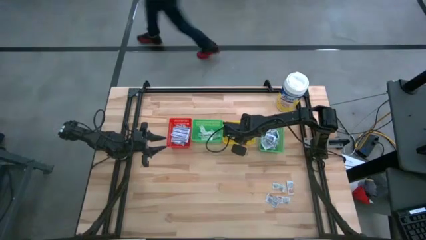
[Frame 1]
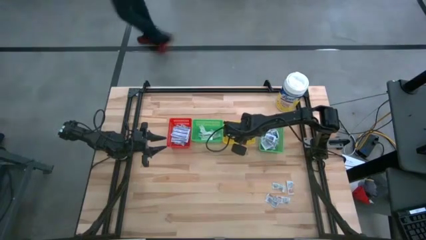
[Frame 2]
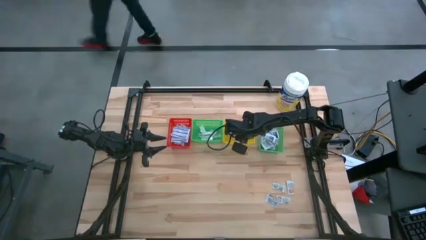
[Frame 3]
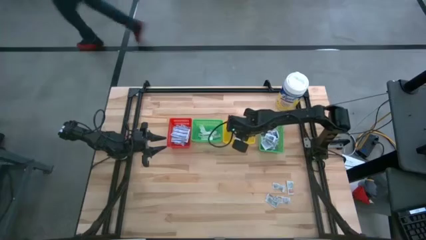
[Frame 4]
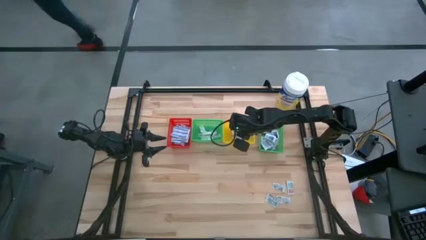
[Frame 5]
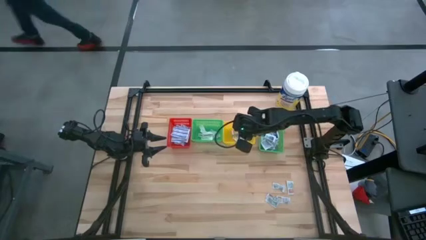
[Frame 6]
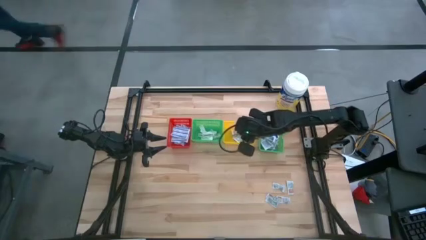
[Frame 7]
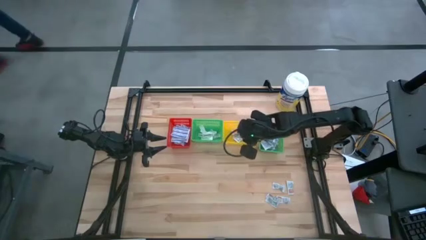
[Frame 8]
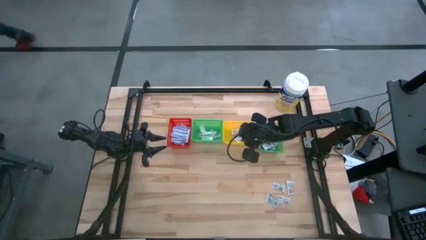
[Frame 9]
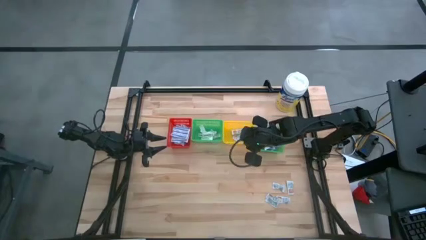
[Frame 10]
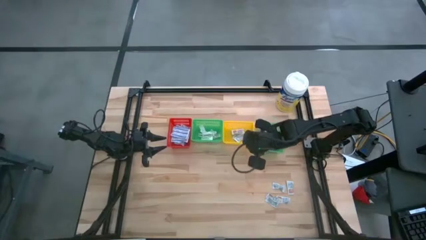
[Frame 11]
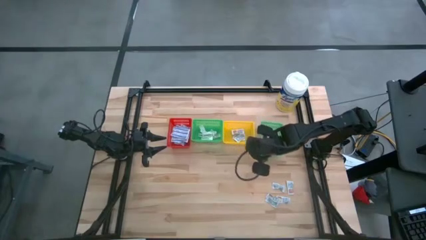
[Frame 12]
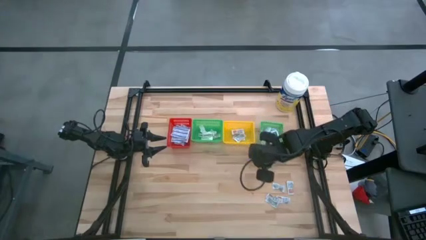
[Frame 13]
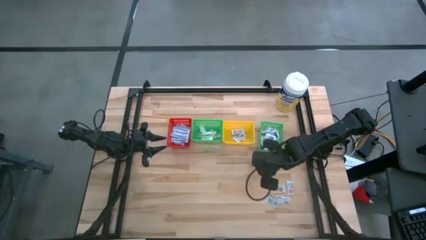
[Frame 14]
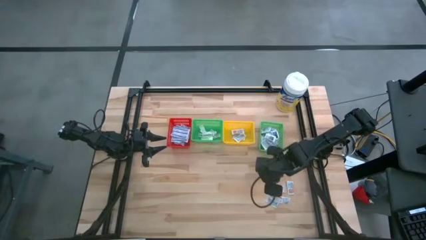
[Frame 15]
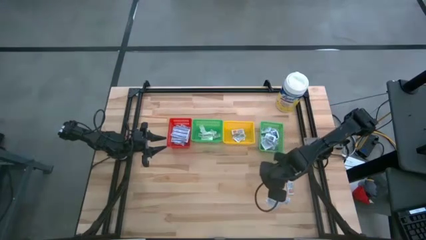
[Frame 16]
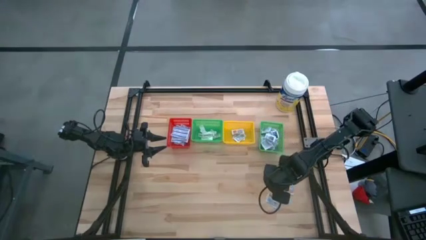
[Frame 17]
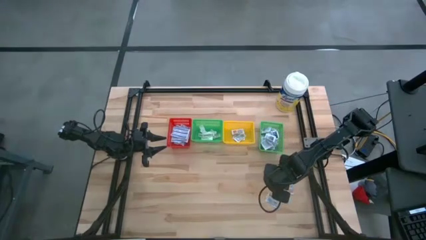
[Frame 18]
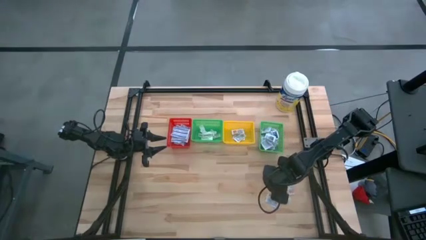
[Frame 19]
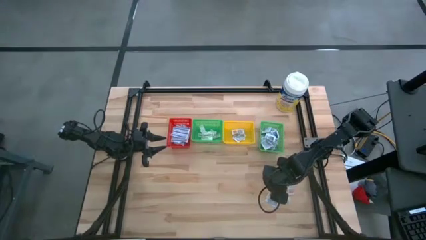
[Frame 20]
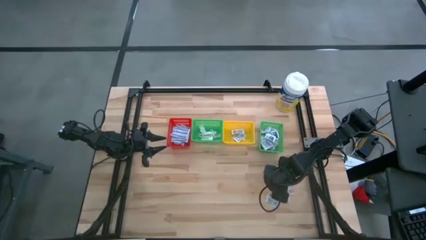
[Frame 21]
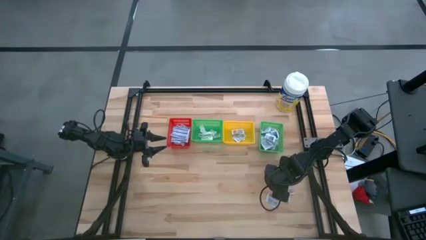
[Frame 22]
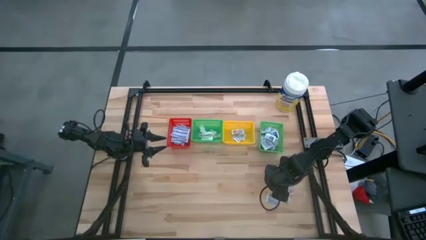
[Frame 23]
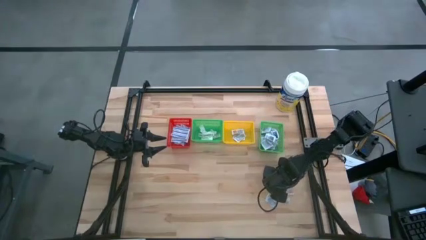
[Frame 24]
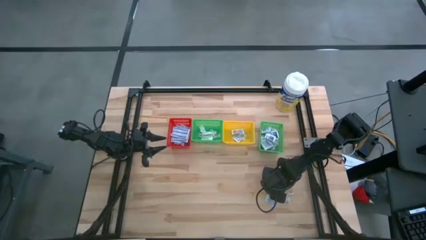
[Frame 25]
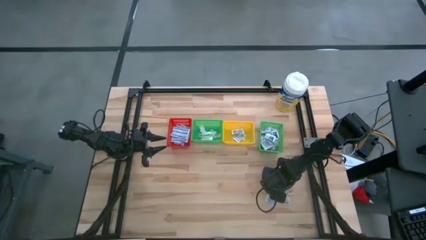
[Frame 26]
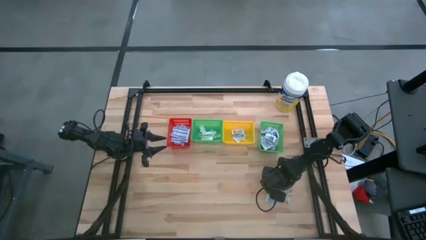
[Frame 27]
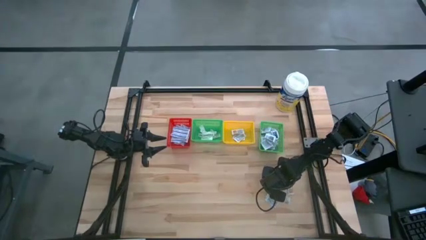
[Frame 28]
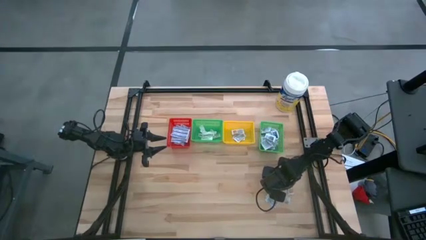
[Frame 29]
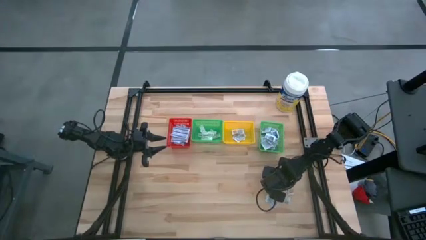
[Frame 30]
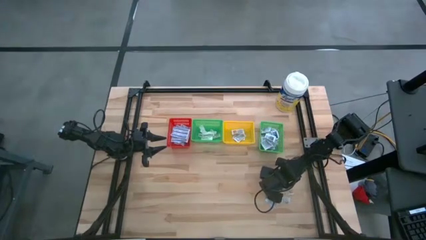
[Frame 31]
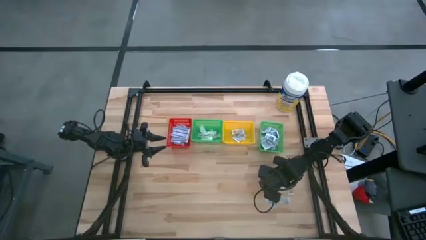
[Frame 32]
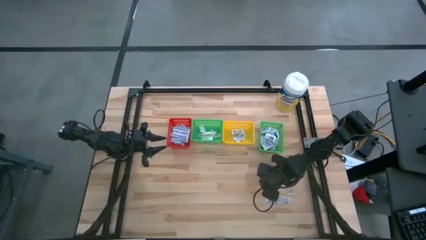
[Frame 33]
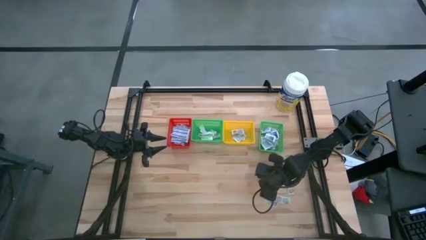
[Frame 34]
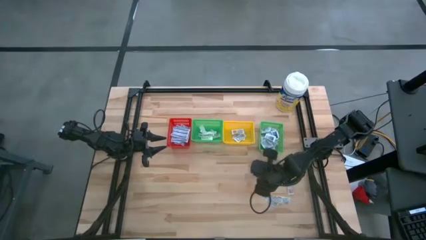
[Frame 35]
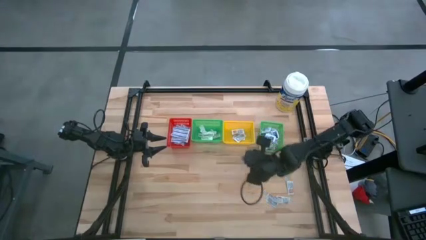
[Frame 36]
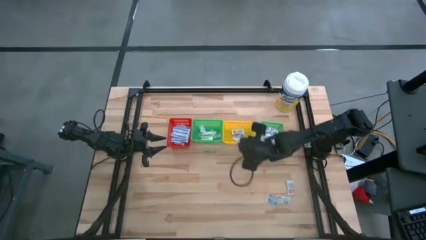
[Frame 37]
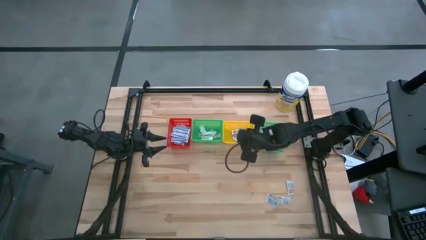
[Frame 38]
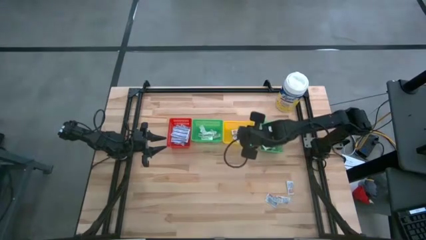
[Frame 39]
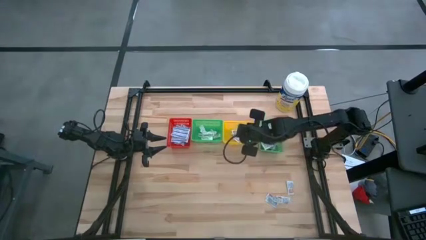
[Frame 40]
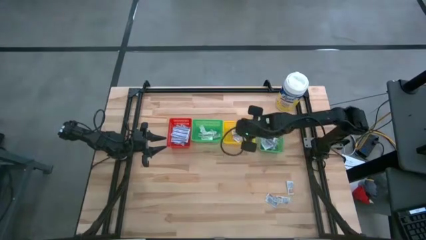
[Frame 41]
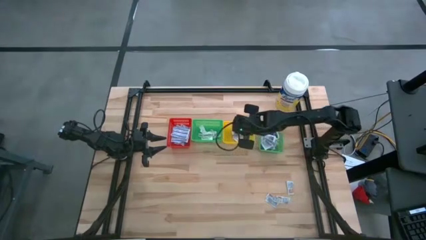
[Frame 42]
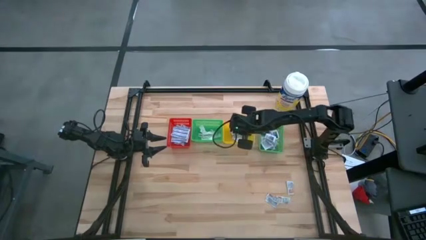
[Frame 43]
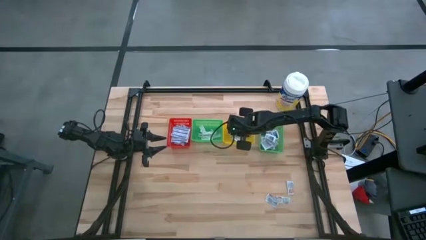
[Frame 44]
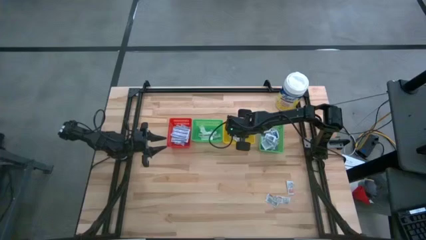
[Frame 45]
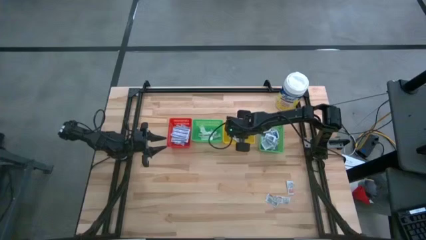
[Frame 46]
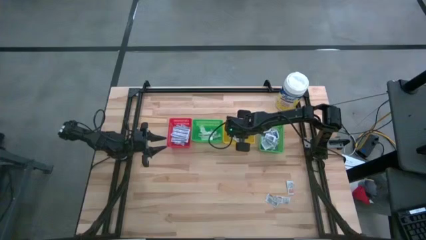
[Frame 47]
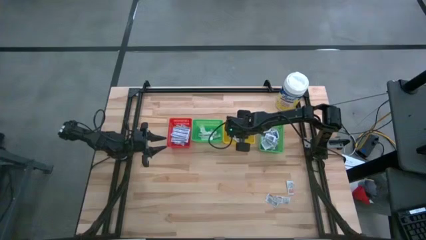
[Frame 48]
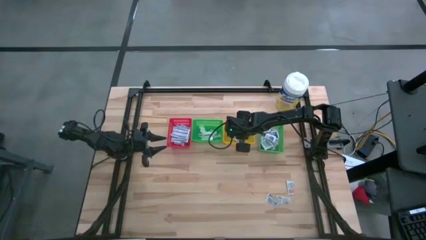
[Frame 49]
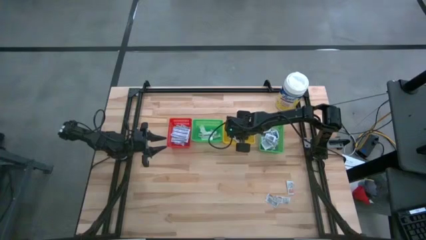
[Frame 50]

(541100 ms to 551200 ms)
Task: Pick & Place First Aid Supplies
Put the orange ointment pack into the yellow bin

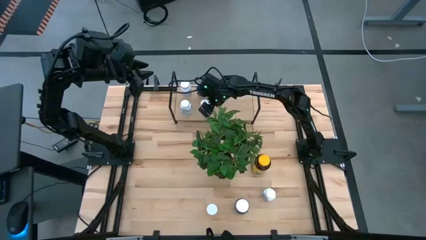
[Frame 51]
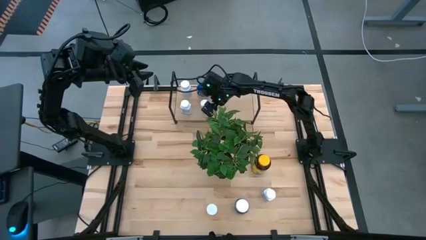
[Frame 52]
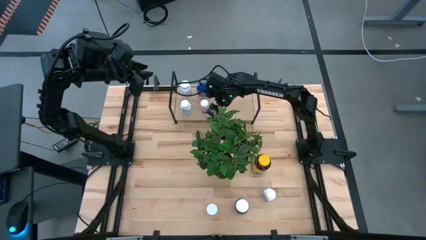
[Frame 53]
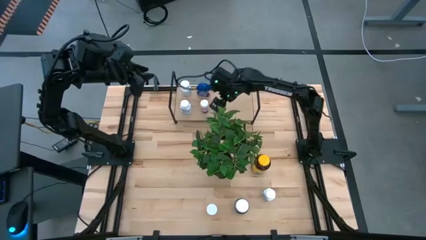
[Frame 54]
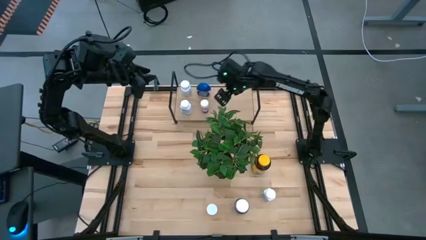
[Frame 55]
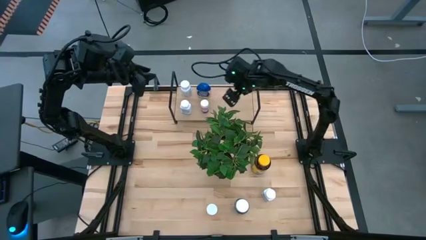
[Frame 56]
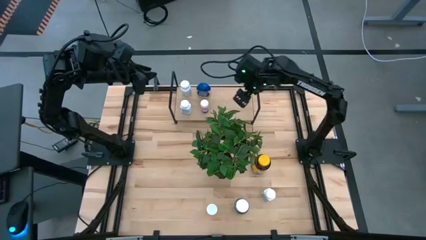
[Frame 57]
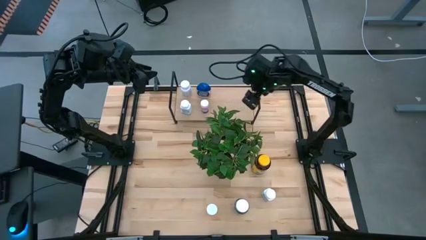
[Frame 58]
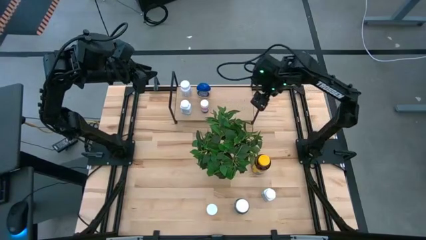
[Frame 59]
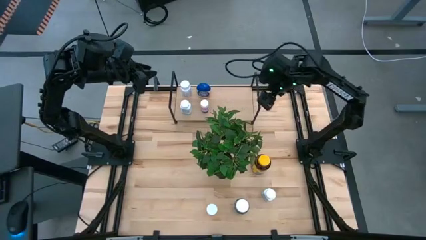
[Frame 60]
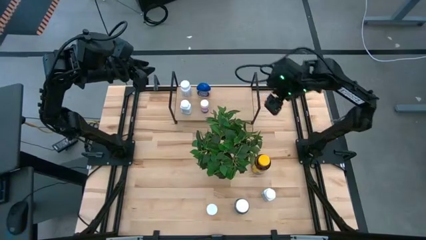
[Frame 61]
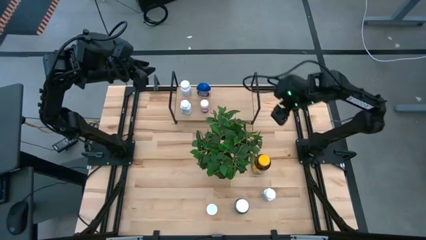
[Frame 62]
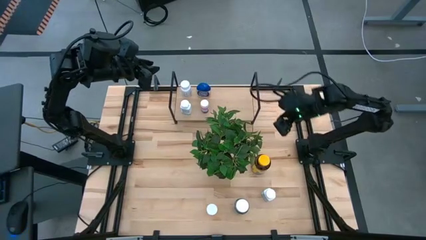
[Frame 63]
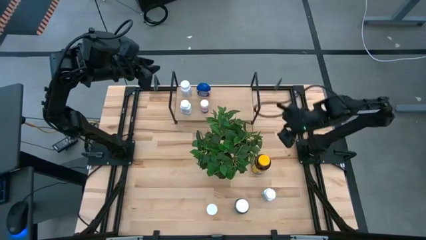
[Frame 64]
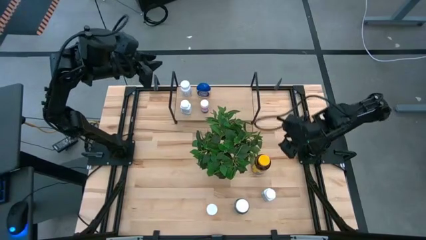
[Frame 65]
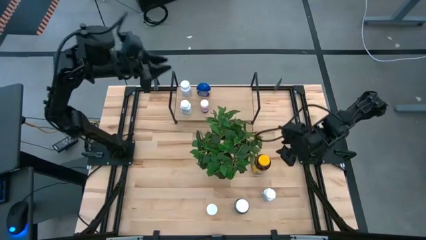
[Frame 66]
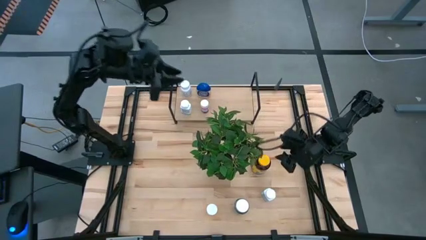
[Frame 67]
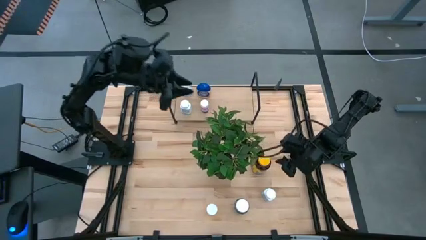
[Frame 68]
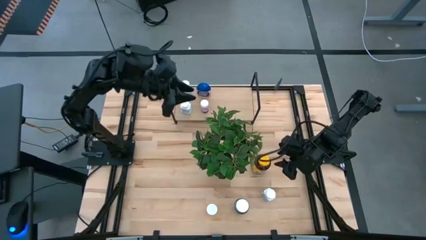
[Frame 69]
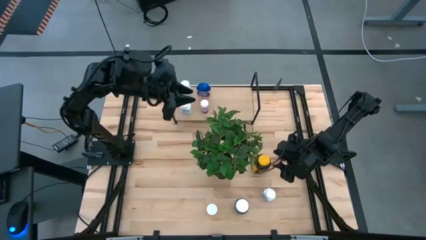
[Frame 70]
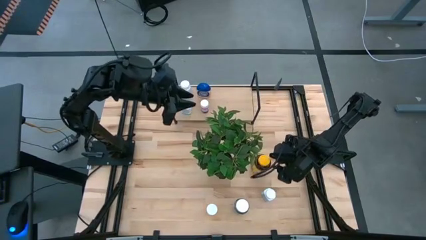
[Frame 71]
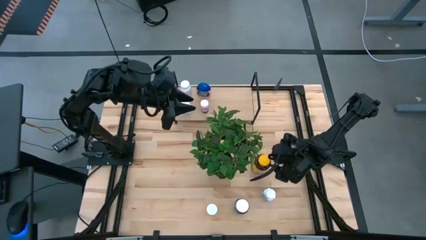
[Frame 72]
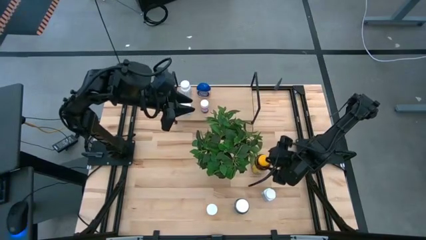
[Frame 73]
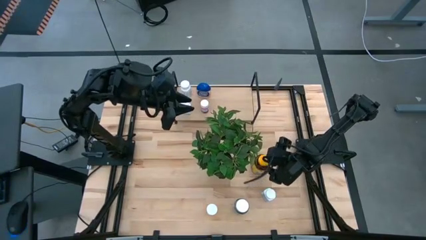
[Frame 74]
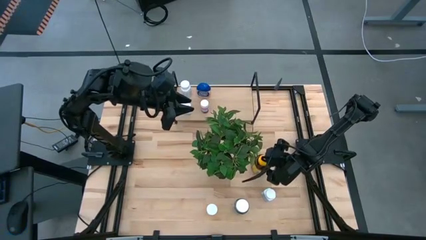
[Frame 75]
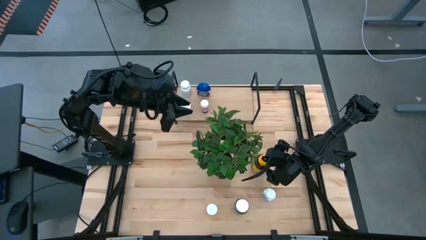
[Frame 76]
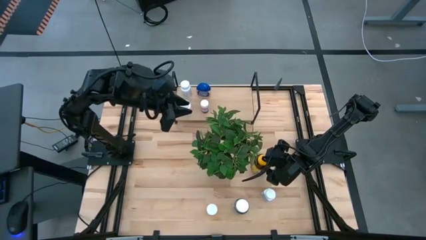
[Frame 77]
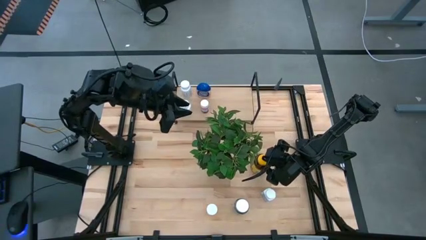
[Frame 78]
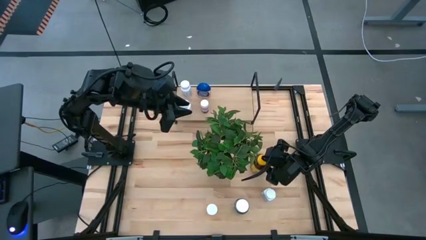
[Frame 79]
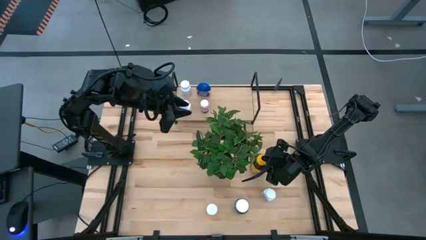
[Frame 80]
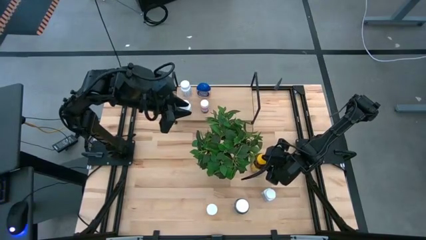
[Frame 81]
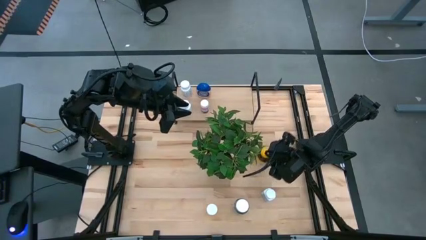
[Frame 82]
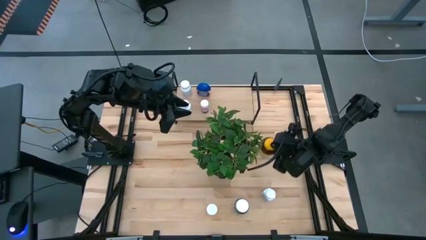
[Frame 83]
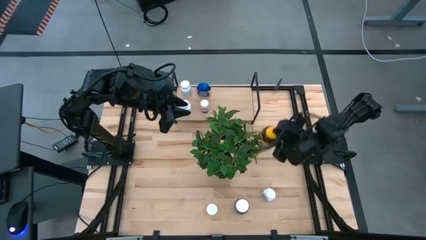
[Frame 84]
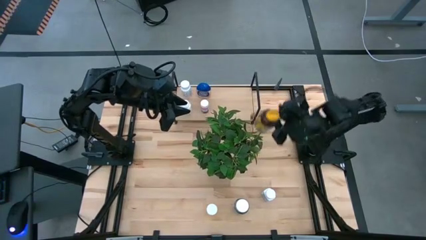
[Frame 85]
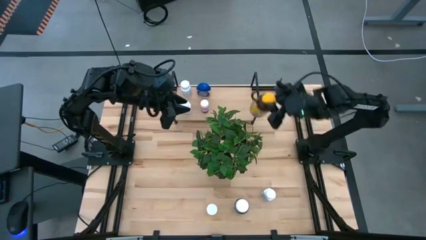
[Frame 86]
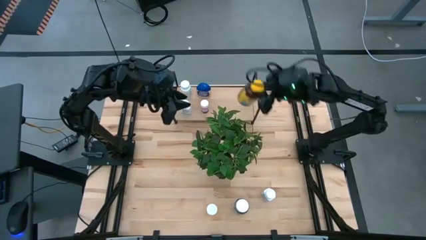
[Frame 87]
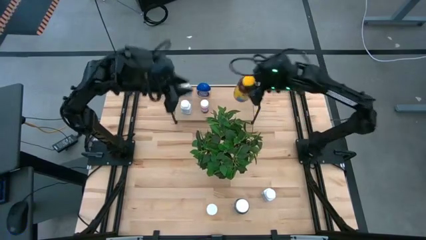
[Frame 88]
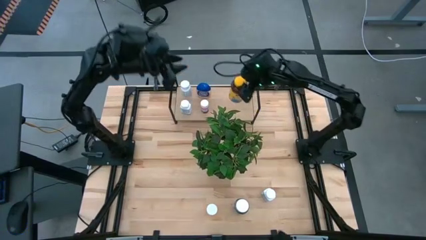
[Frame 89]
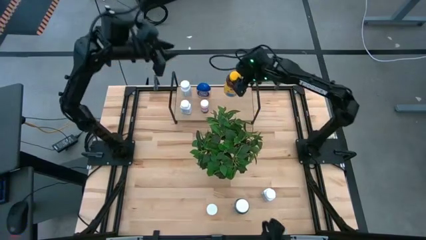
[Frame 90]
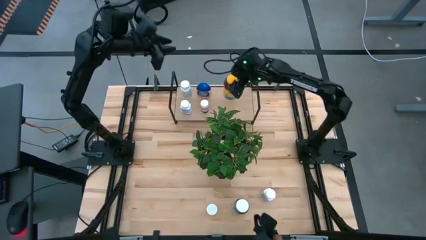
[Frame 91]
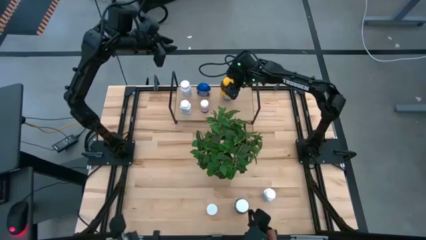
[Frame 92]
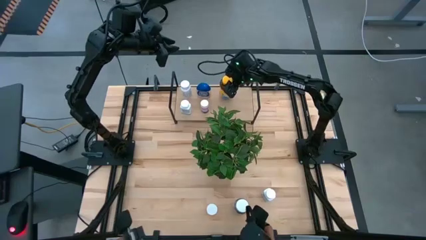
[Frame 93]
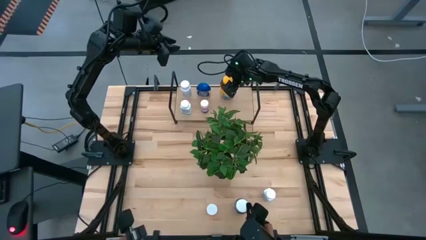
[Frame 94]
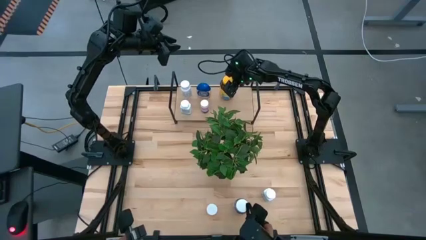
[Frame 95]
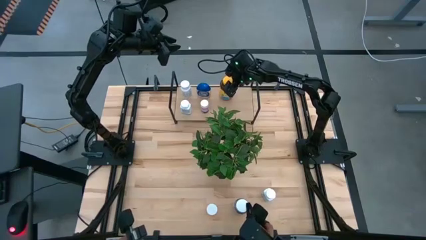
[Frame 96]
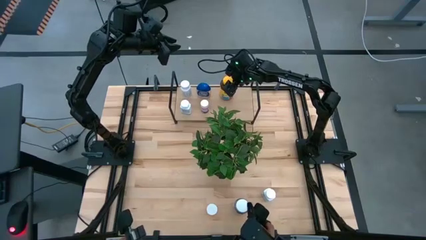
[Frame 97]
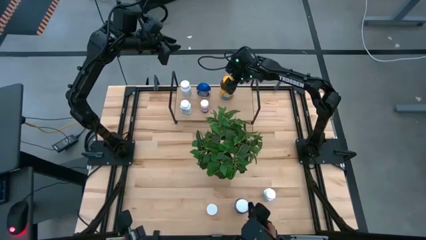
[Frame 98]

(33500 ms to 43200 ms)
Task: Pick and place medicine bottles onto shelf by color
Put the yellow pill bottle on the shelf
